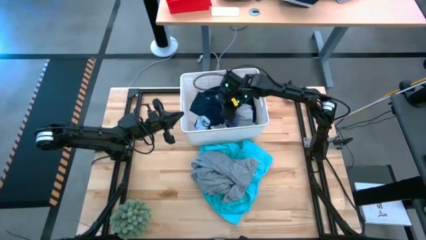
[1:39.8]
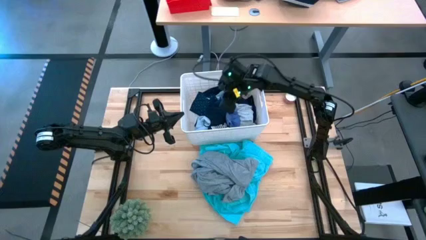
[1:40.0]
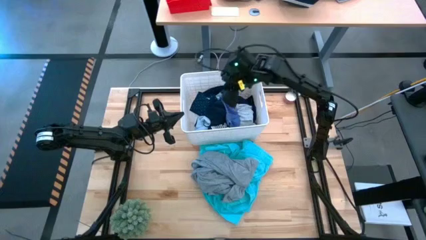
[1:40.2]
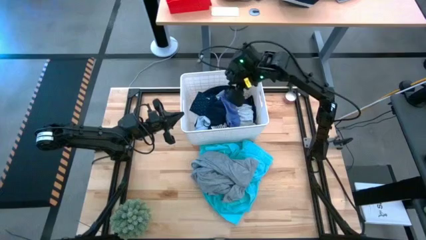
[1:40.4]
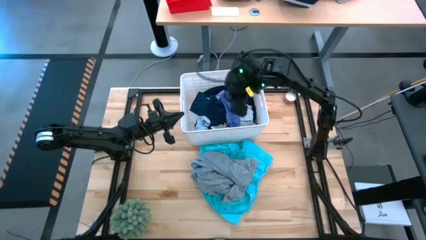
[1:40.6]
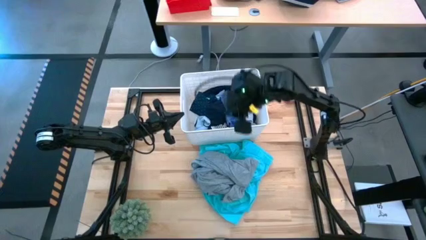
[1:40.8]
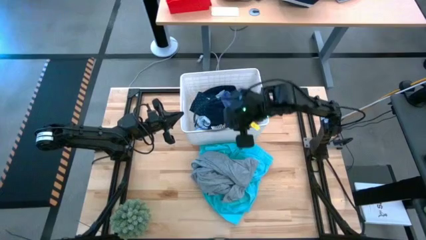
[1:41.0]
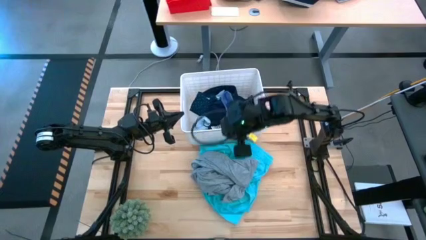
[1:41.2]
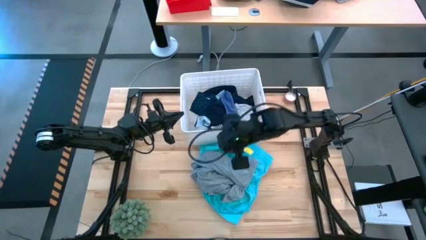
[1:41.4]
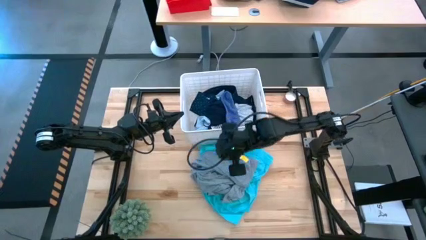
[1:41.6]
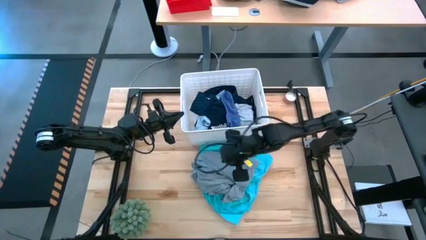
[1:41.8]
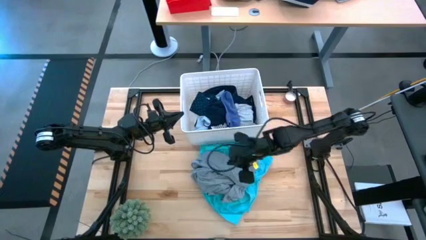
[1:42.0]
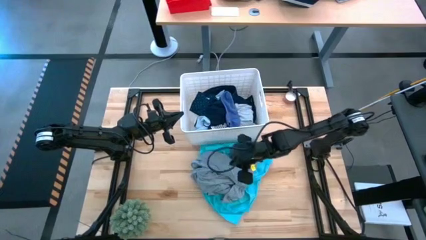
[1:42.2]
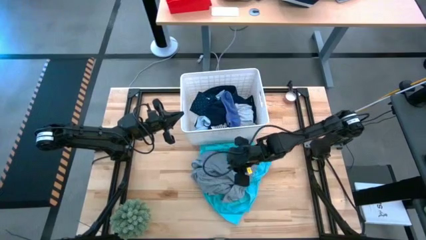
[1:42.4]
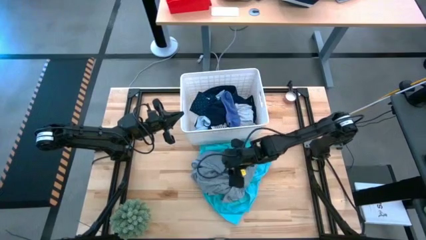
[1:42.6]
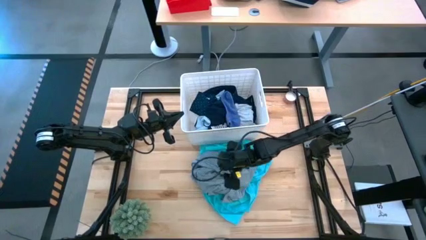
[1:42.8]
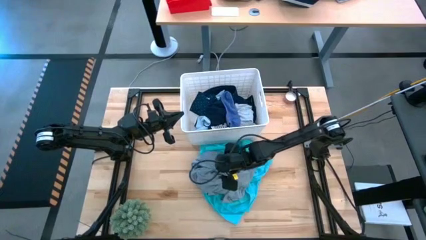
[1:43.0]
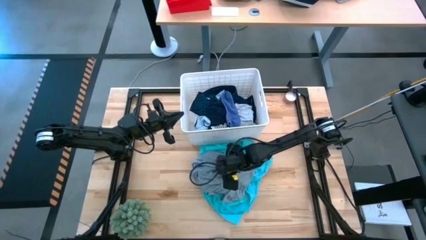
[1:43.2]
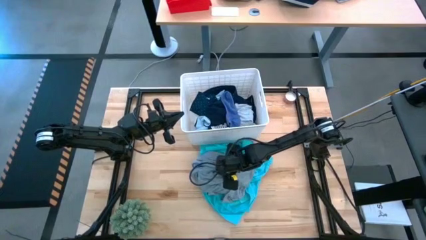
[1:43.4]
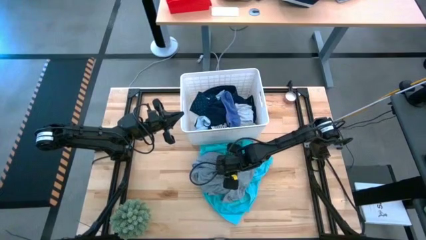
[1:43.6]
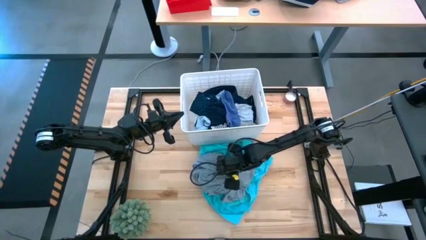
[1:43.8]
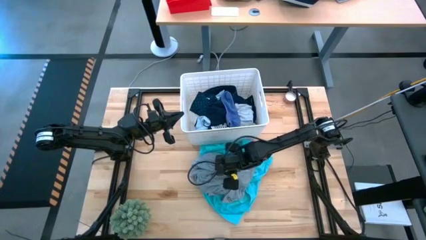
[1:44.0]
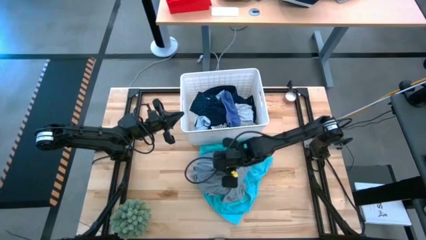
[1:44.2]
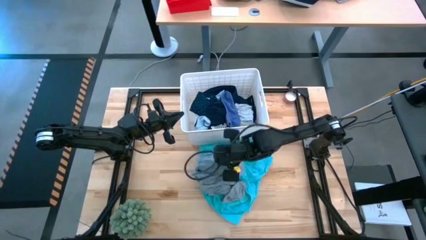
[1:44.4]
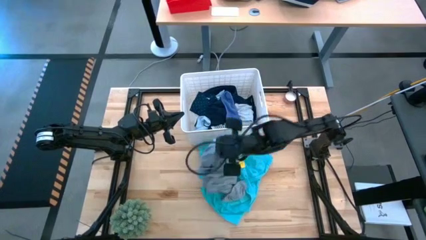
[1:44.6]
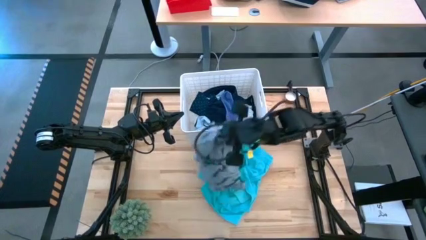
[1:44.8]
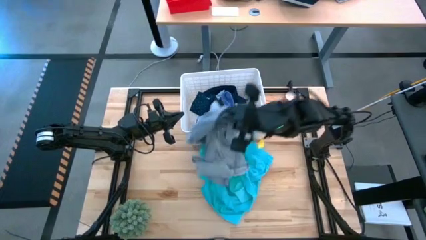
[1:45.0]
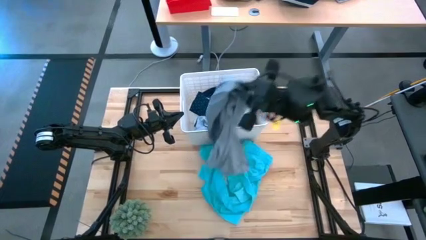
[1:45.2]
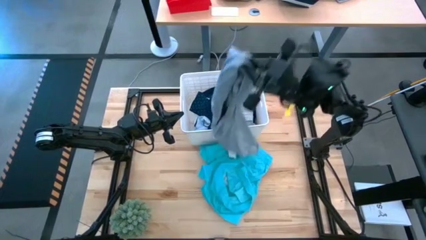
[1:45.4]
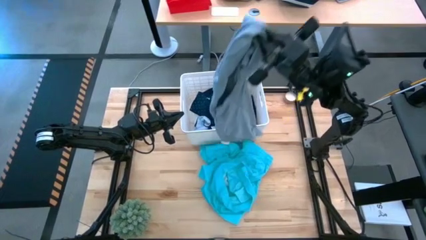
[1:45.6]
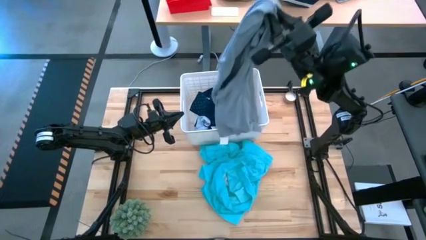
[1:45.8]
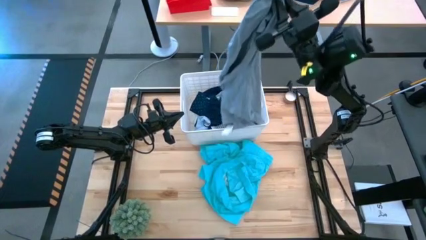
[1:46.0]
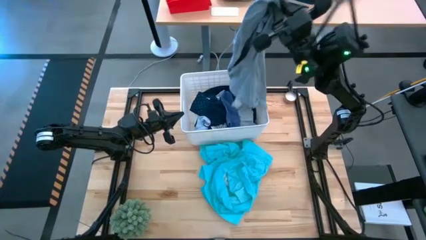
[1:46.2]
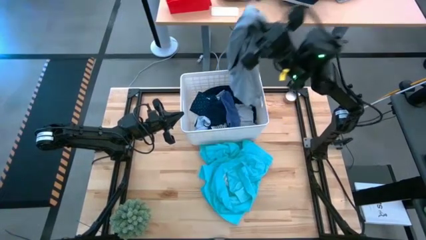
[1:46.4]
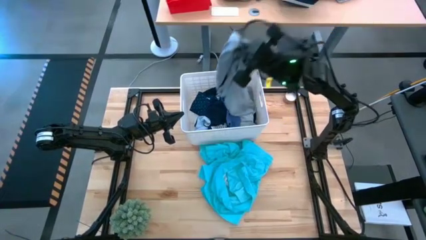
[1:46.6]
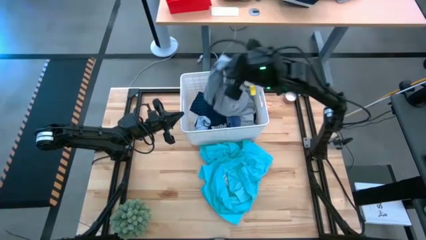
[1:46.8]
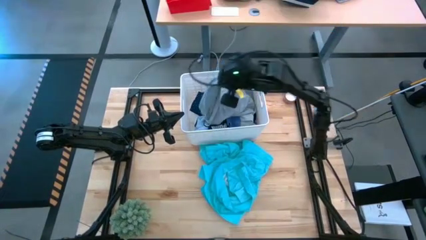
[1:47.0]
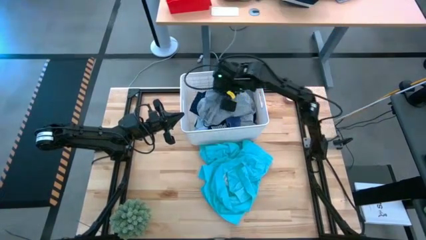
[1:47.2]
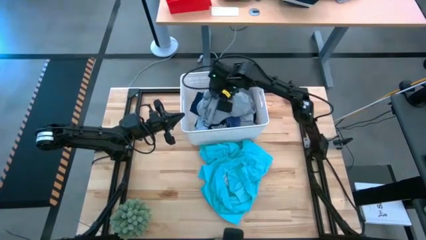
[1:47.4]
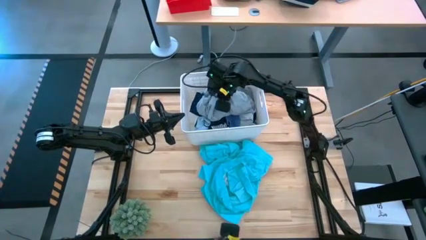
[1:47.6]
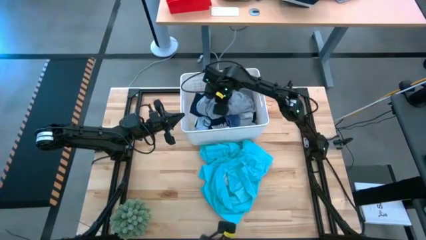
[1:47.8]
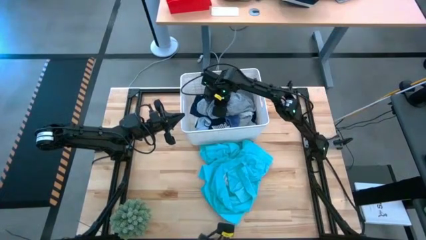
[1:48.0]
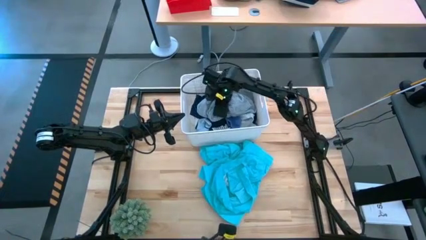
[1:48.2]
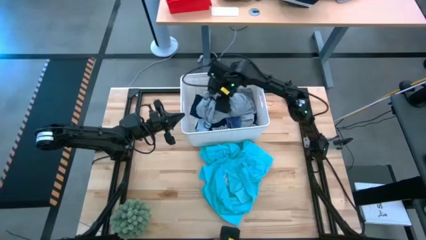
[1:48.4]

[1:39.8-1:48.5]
Task: Sort clothes
Put the gray t-shirt into the white bin
